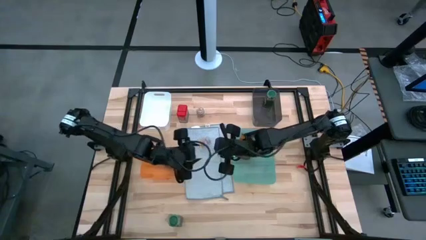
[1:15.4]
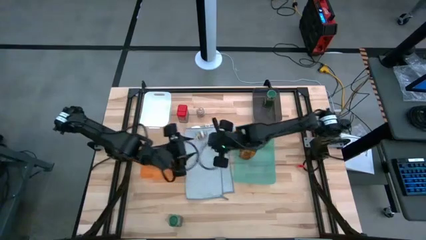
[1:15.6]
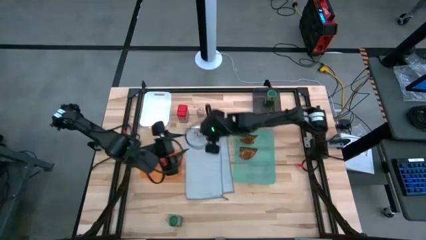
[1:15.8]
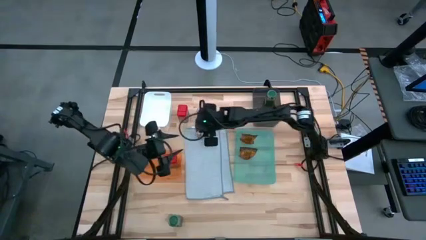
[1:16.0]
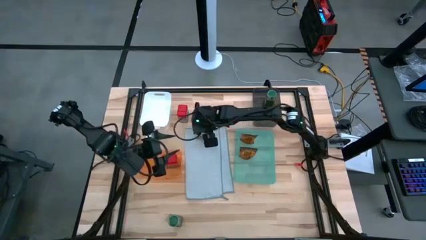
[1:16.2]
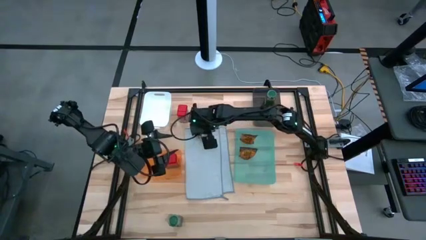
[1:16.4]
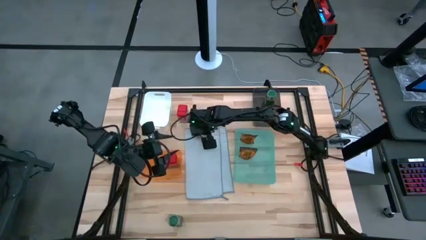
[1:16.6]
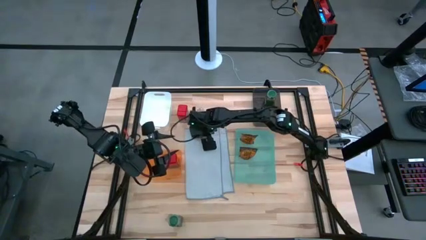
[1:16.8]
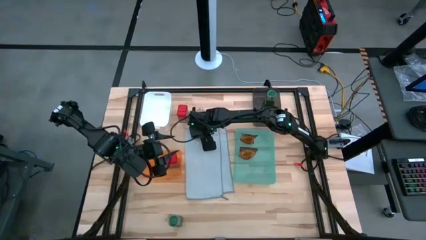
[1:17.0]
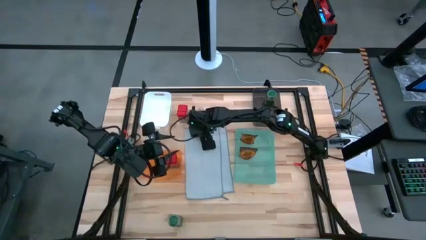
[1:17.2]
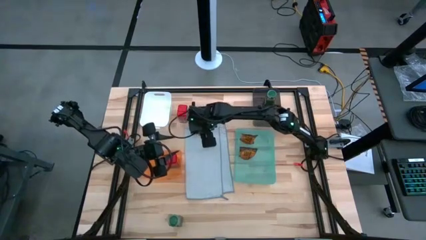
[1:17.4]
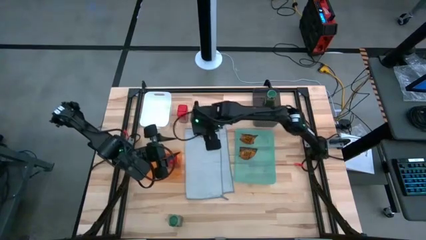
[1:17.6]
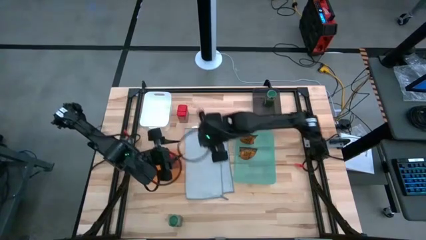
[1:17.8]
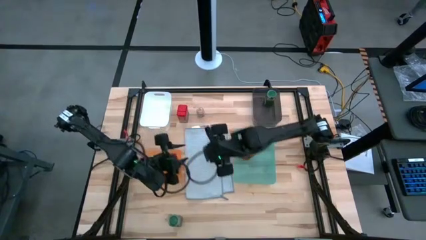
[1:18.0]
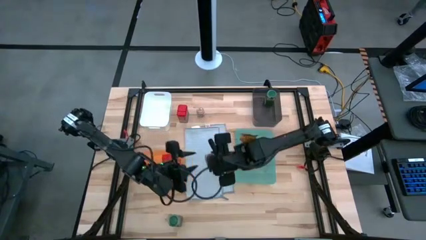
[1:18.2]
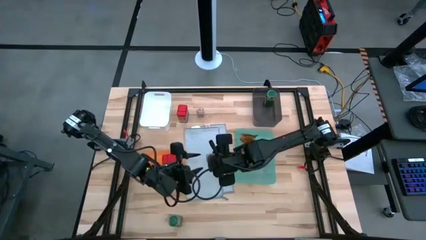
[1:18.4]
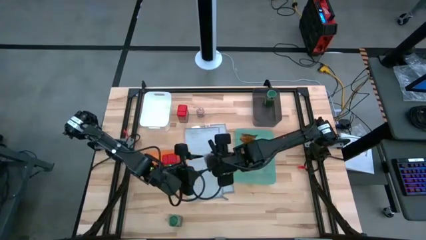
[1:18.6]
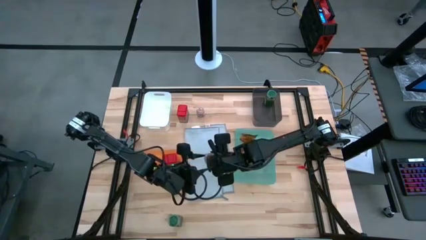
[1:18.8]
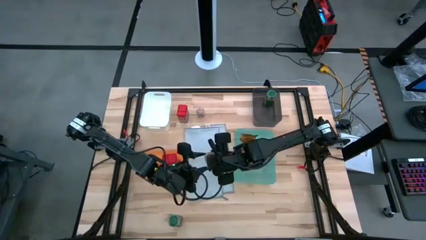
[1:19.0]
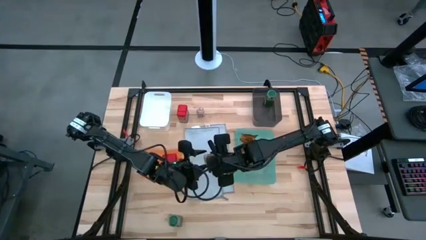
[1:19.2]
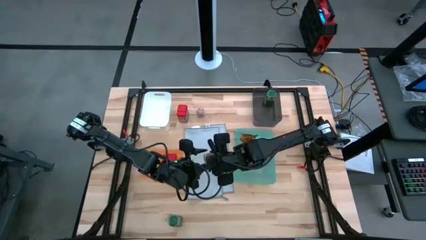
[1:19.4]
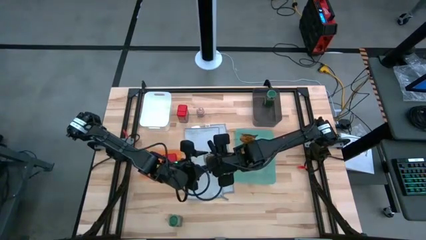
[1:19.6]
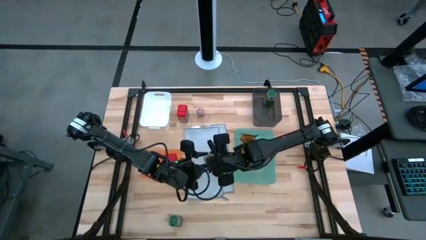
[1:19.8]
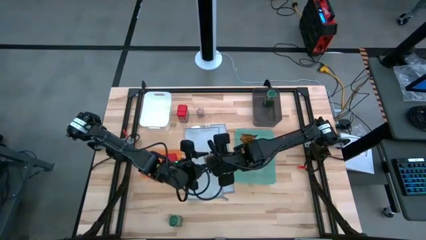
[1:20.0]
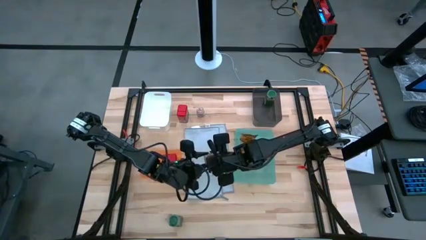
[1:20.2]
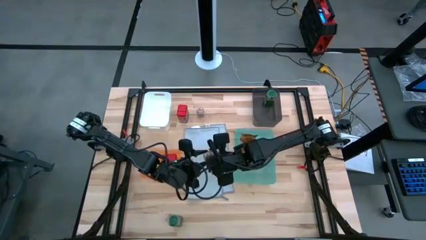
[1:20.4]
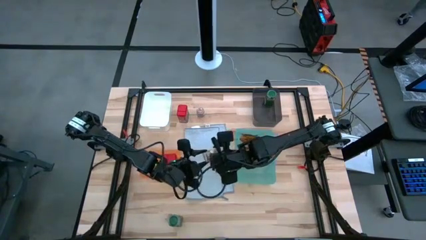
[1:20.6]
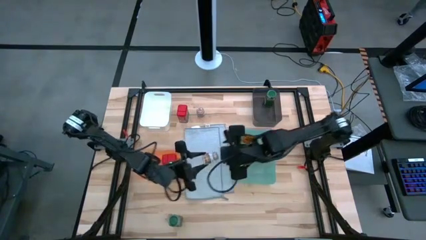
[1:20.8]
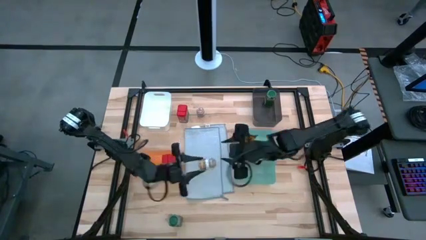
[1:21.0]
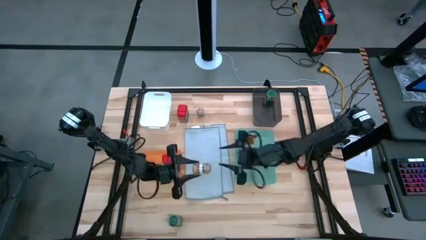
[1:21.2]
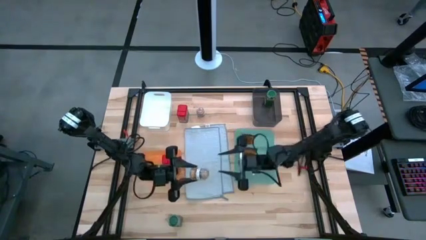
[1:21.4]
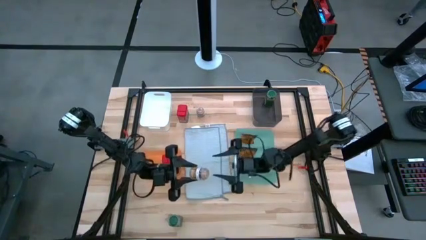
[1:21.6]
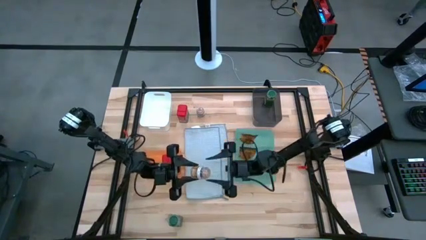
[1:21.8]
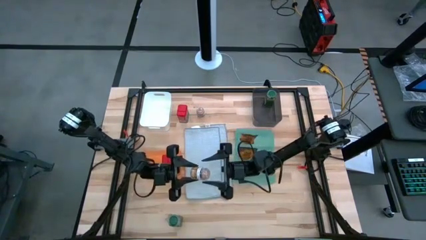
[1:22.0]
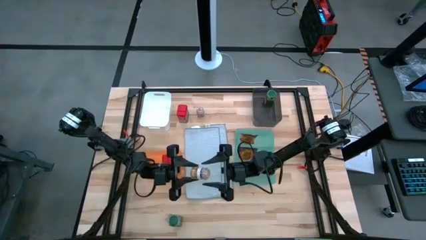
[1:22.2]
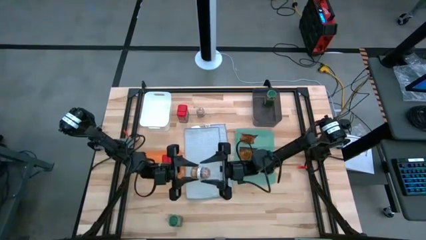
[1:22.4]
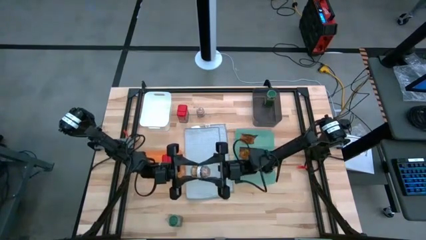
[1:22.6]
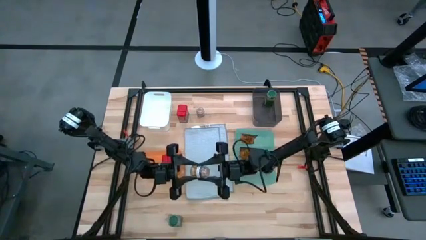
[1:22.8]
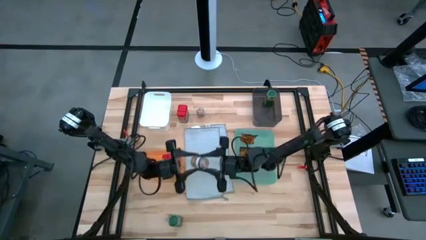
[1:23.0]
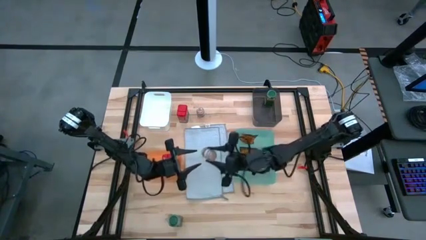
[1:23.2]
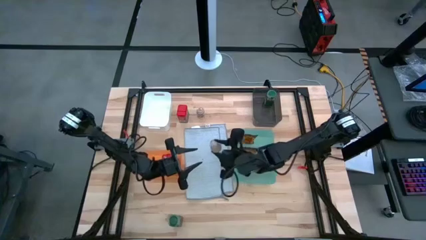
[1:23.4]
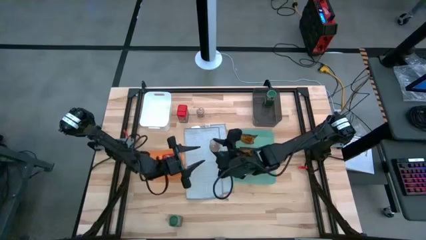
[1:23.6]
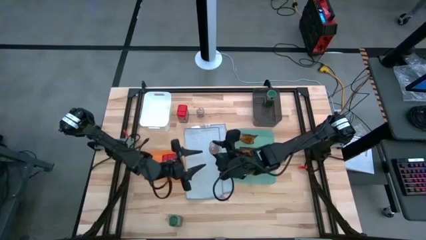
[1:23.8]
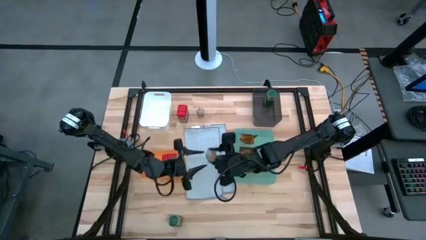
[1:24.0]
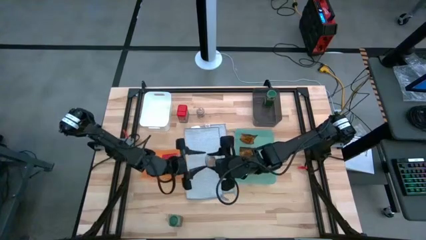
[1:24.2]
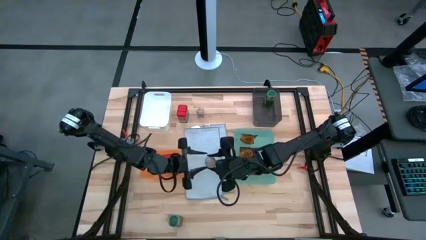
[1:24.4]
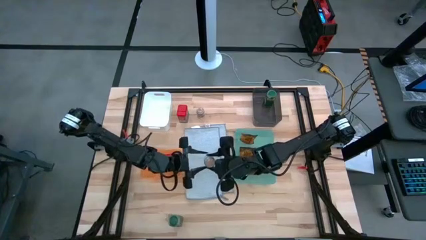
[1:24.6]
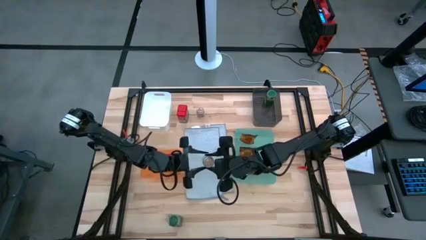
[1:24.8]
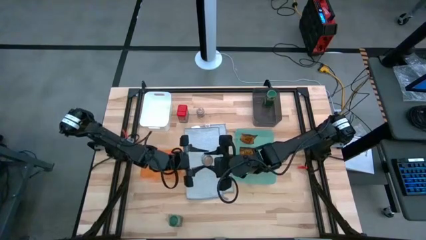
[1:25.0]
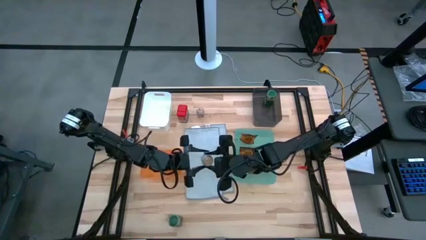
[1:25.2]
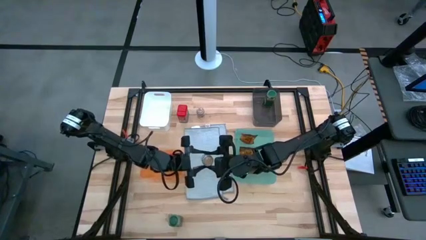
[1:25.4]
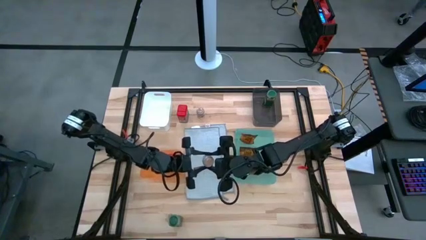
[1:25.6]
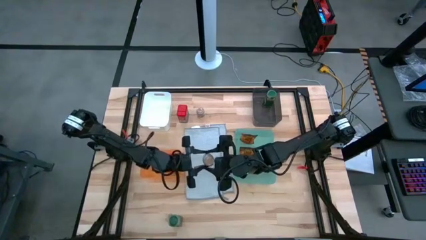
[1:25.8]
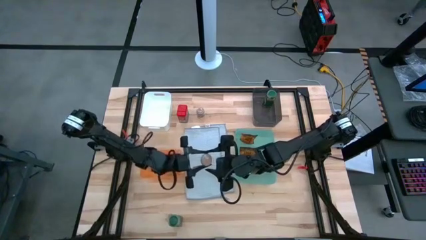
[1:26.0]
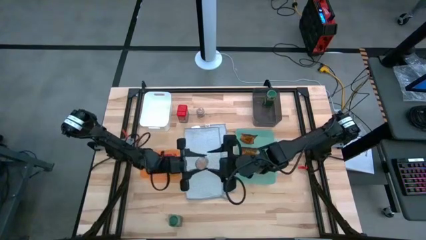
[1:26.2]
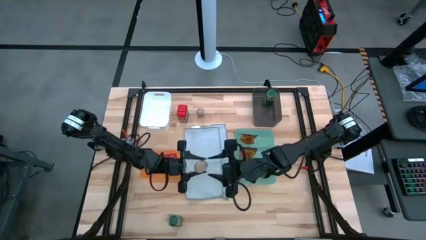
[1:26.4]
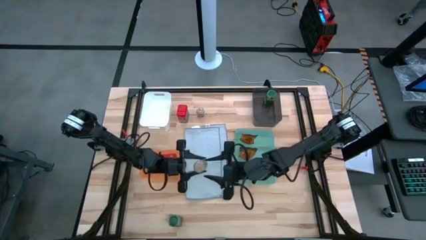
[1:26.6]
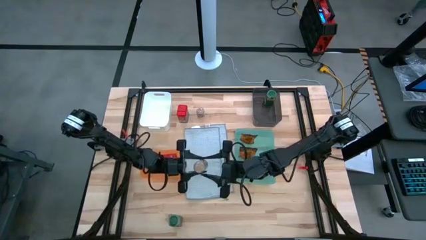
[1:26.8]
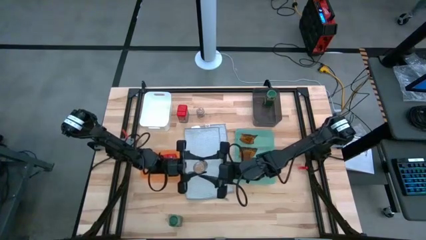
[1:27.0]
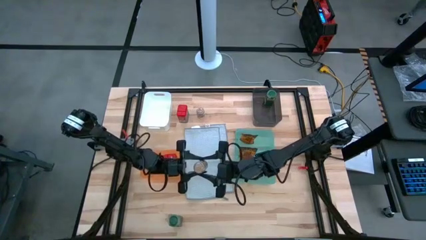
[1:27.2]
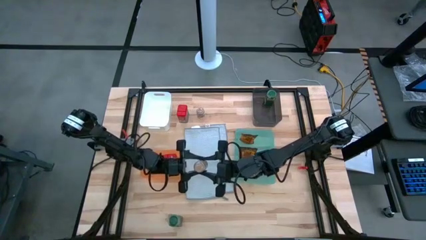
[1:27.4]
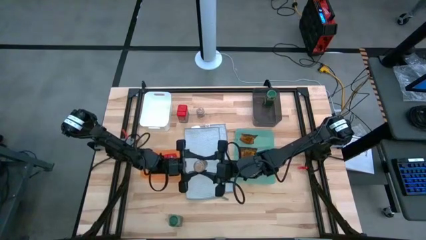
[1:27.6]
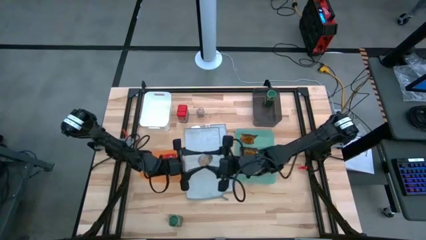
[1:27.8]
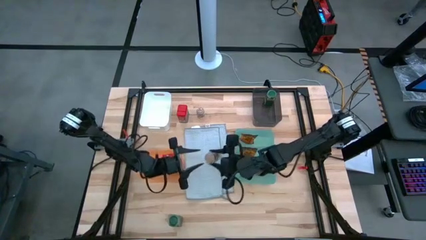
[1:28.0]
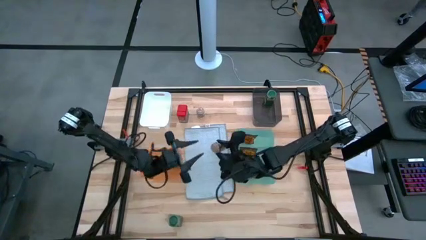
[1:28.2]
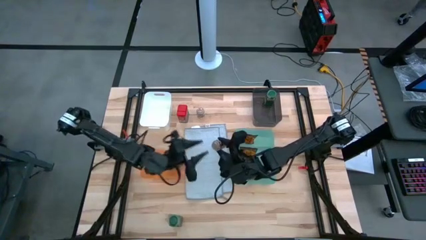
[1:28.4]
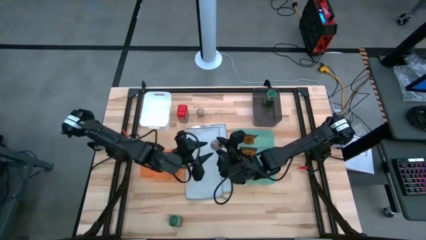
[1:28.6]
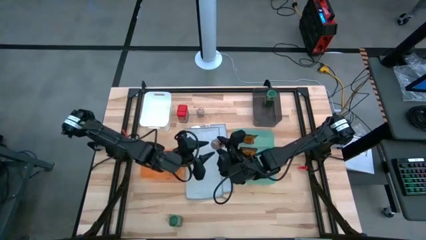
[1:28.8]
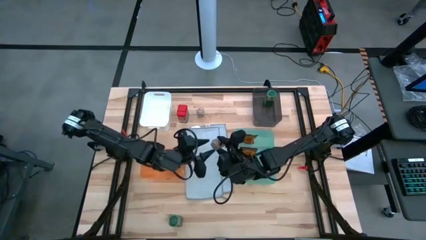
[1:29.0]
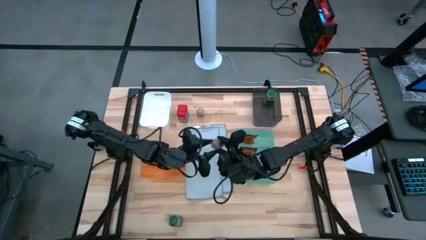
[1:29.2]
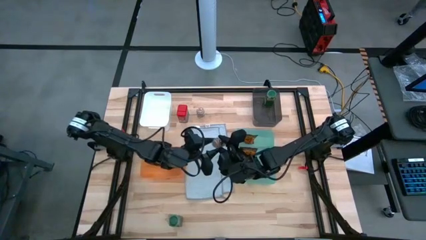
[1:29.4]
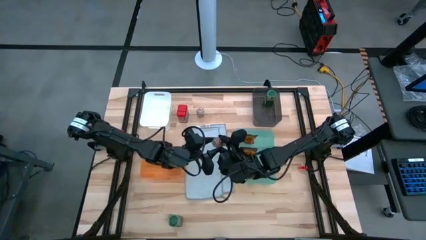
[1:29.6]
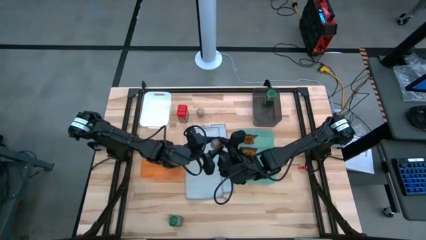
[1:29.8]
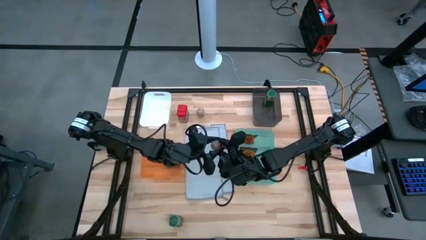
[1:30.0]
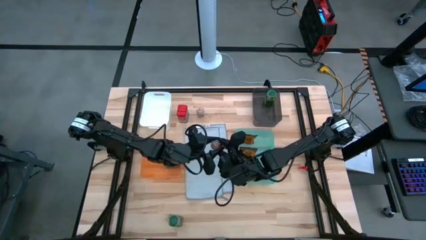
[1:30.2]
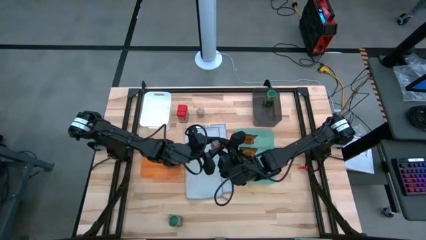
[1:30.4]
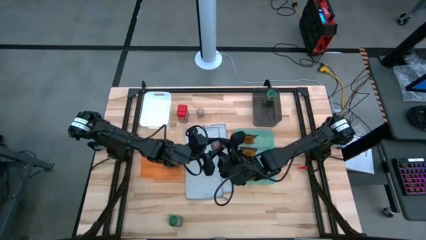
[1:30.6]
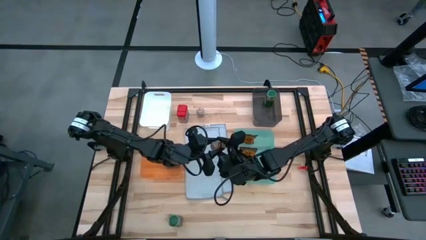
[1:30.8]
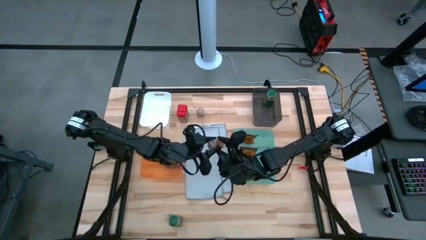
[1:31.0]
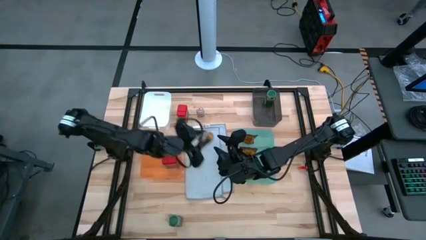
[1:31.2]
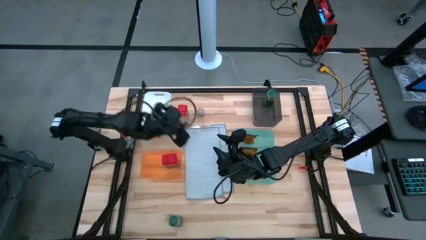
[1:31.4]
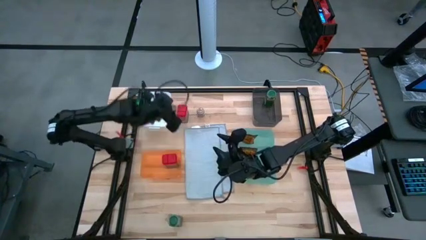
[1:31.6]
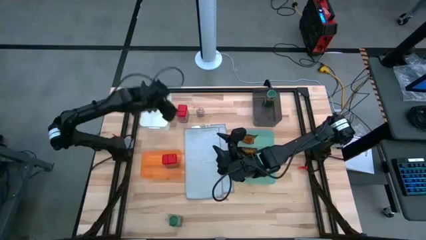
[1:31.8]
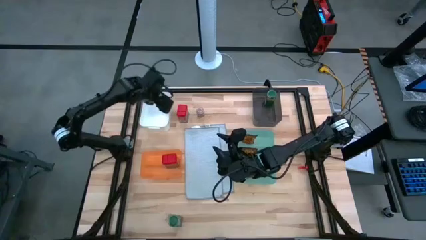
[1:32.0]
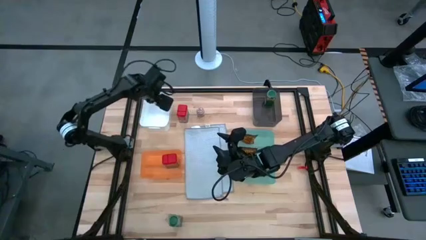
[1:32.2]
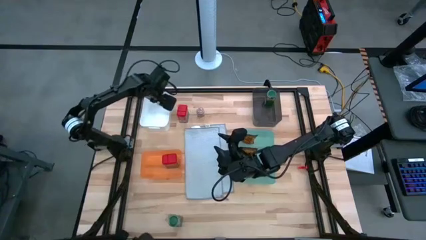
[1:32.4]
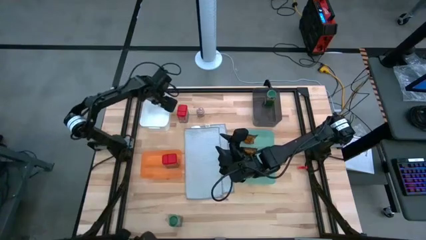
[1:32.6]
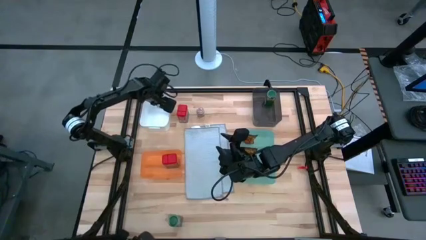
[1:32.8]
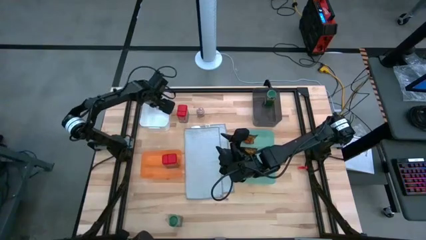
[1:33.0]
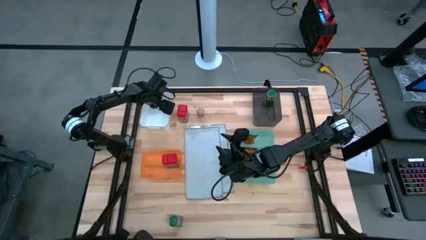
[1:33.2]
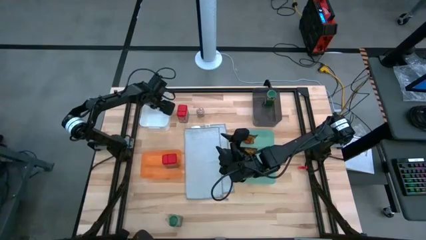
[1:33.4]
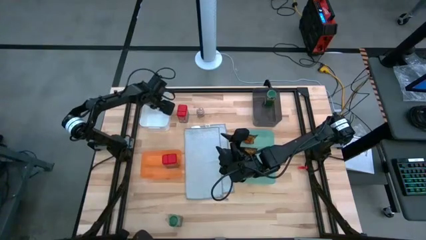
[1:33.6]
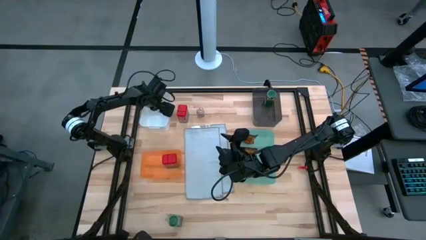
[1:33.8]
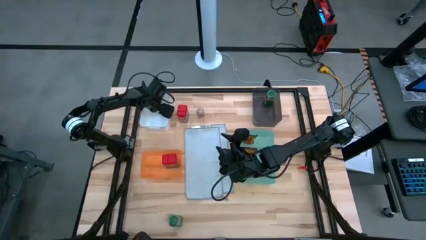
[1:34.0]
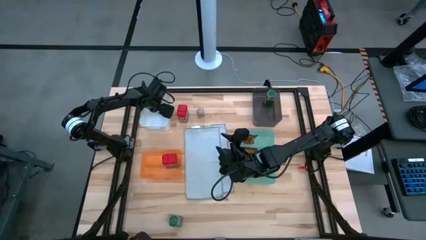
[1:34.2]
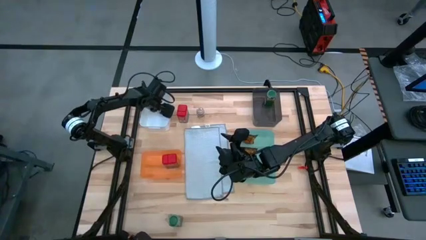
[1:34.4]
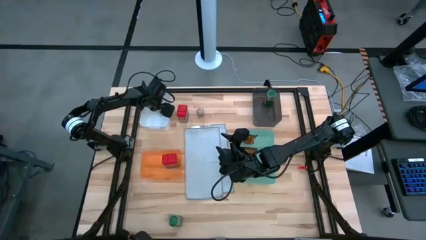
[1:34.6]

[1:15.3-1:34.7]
Task: Sort spices by type
Put the bottom brown seasoning bottle into the white bin
